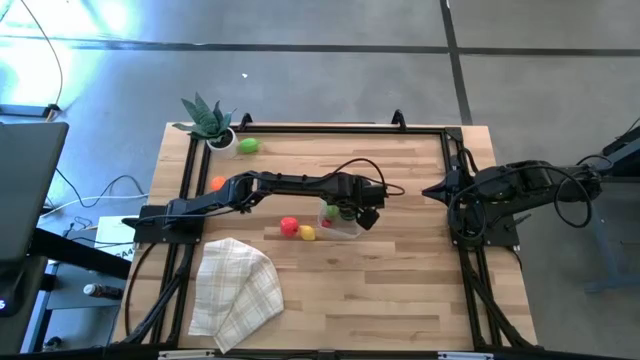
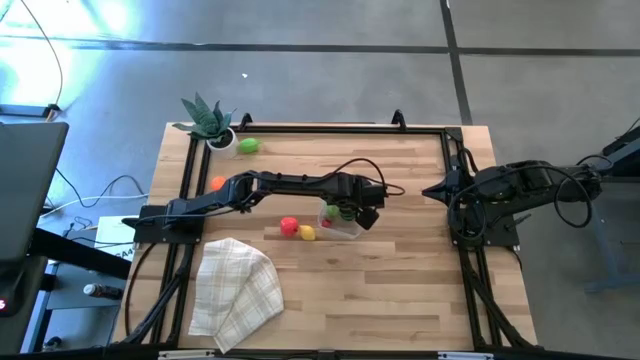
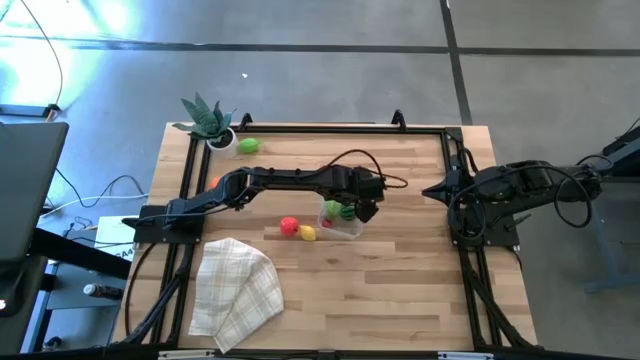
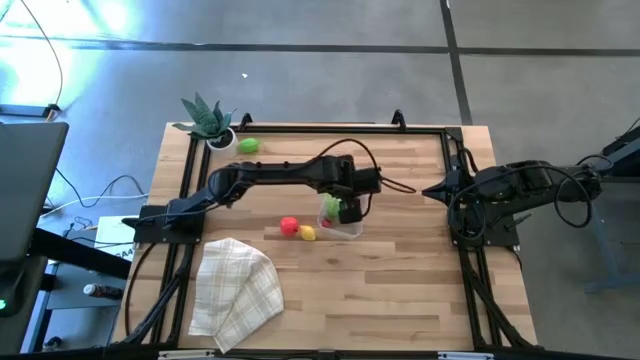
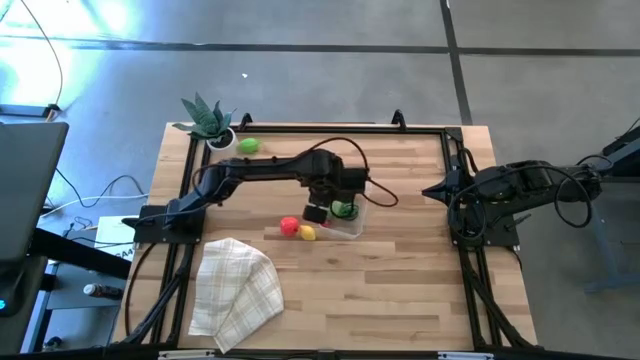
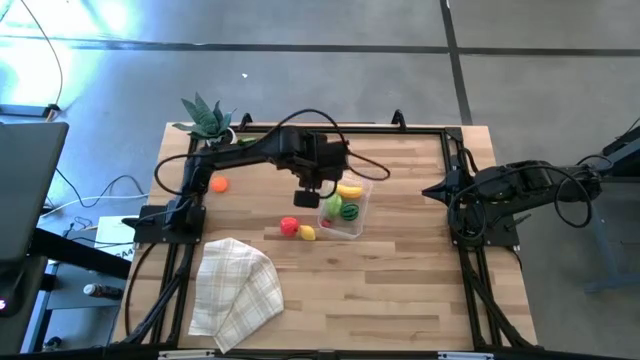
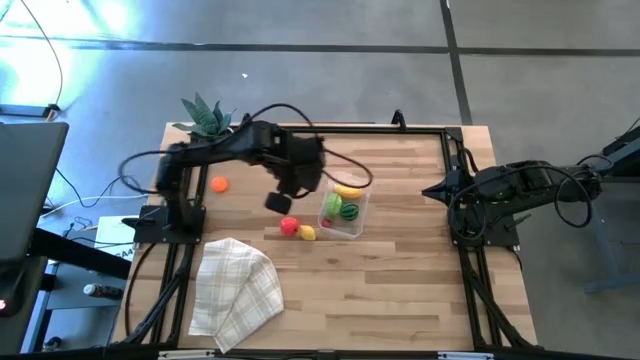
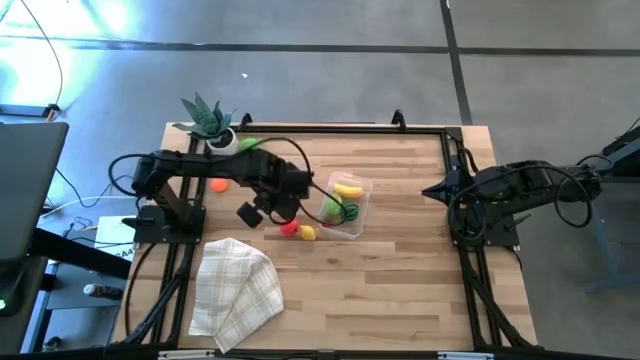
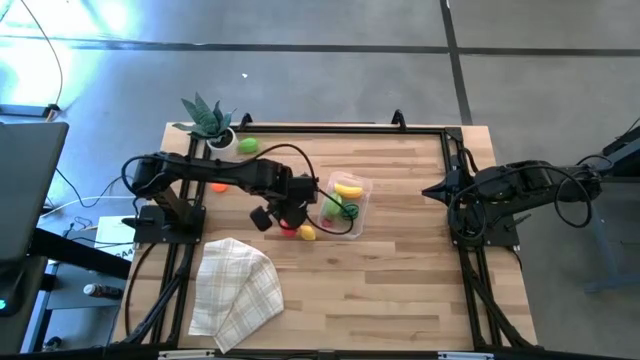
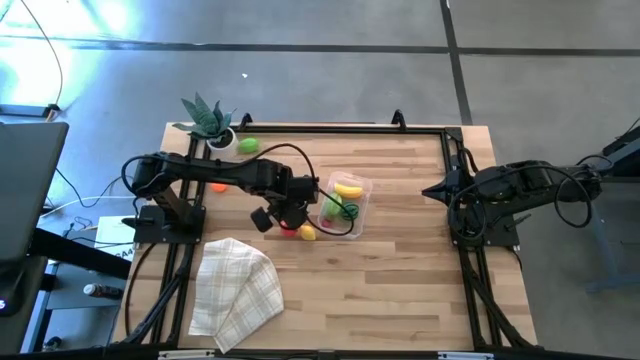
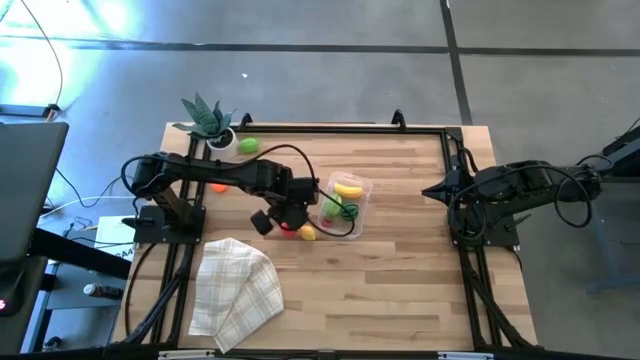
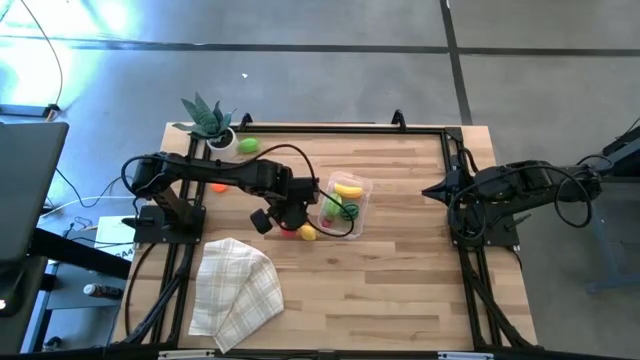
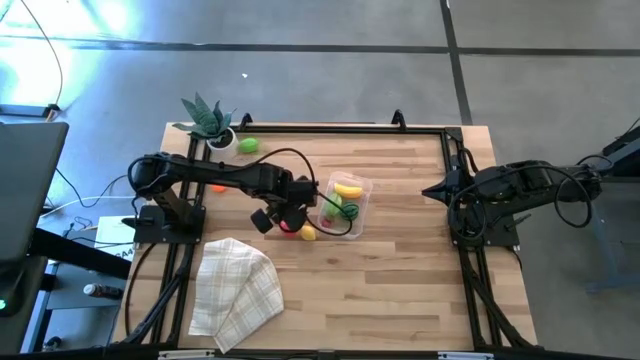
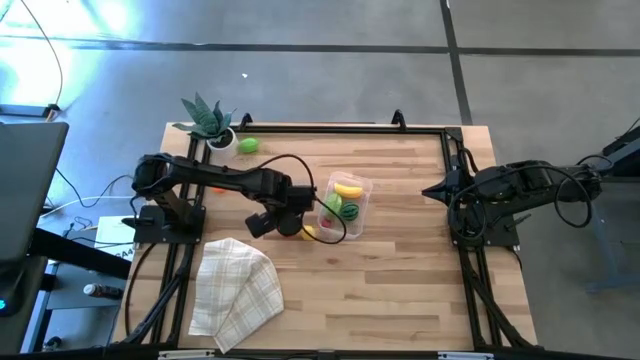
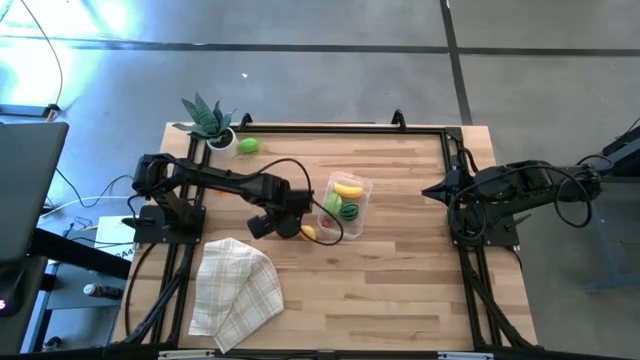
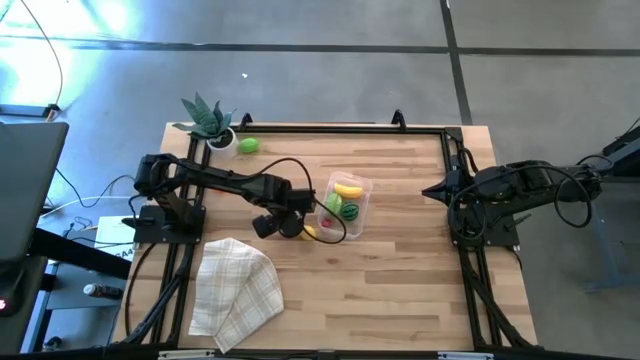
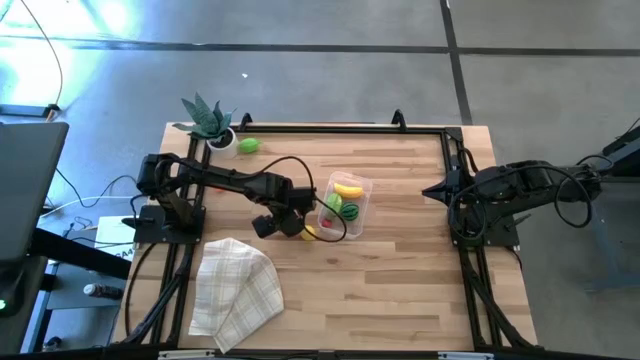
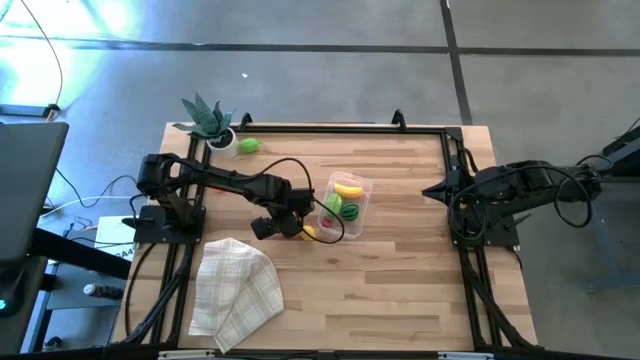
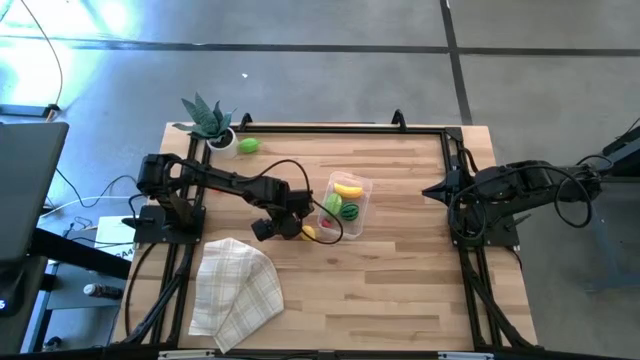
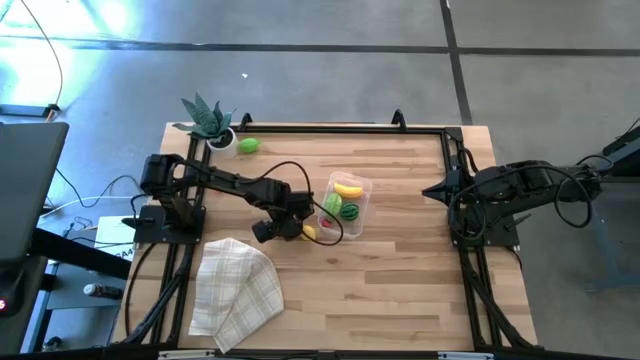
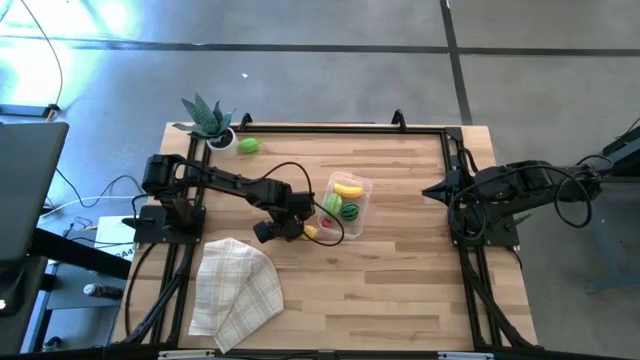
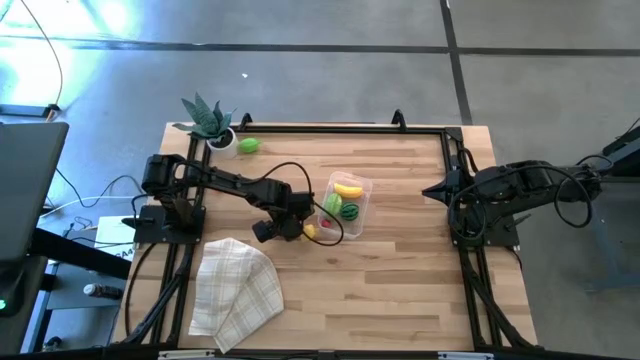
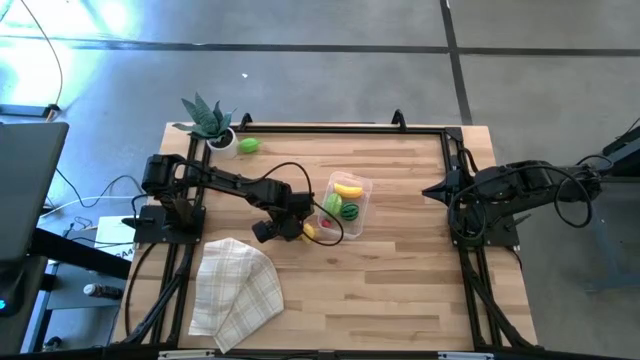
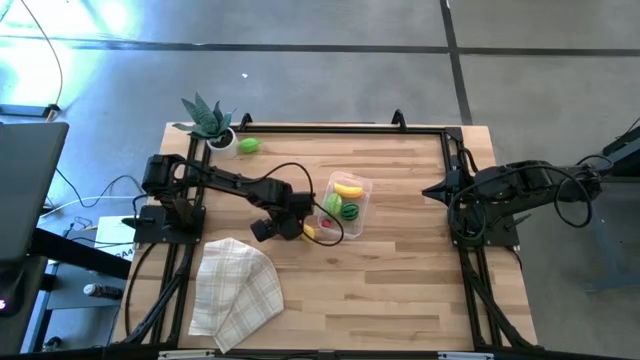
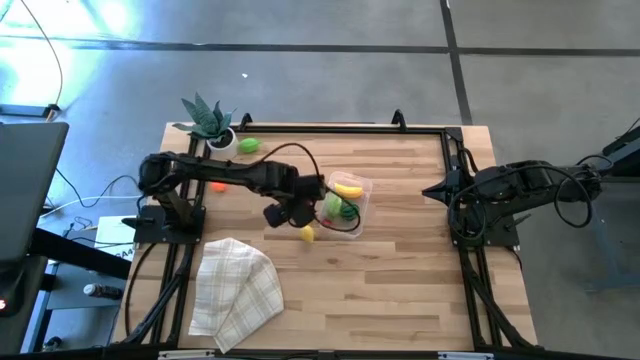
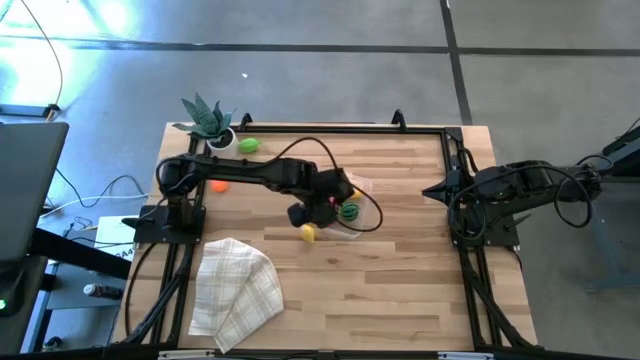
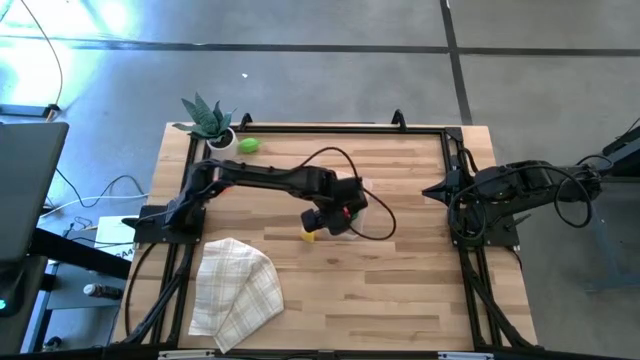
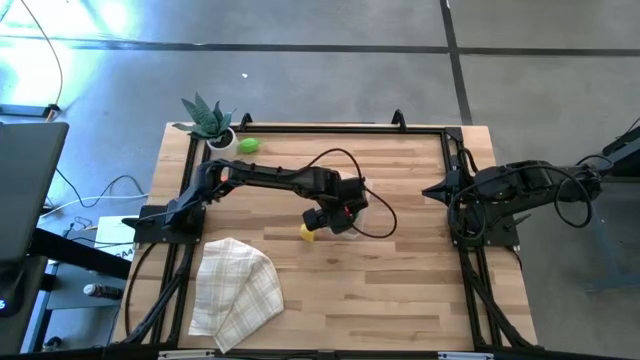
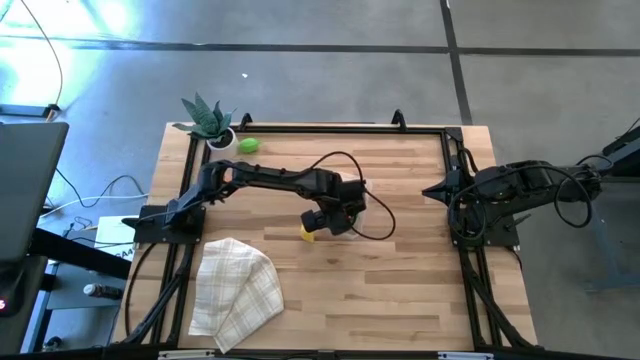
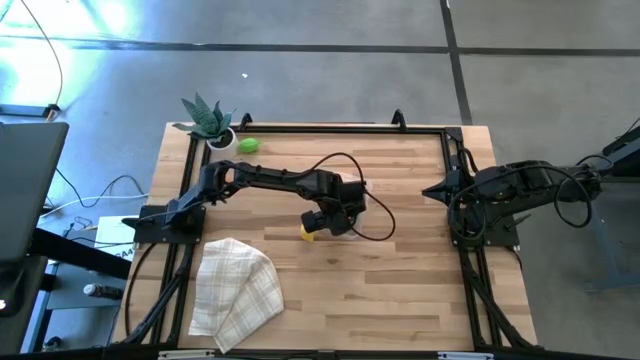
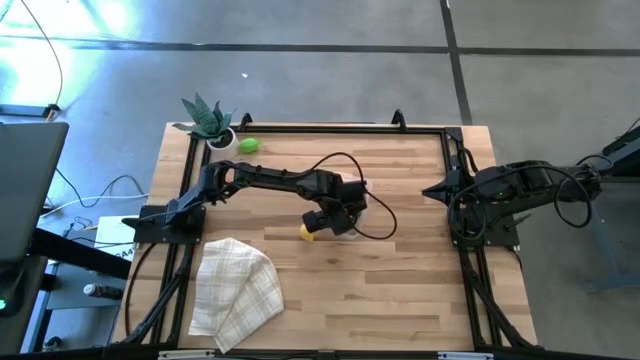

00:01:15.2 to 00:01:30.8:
Task: Pick and placing Produce into tupperware
Put the apple into the transparent bin

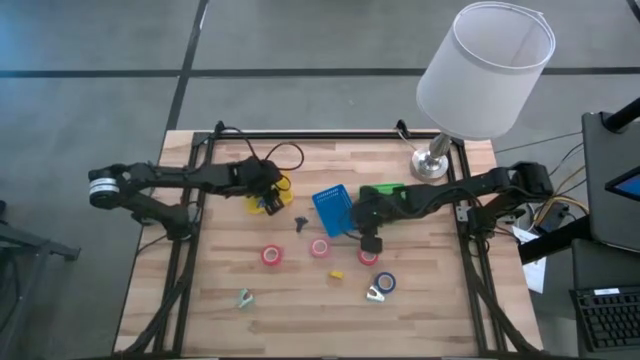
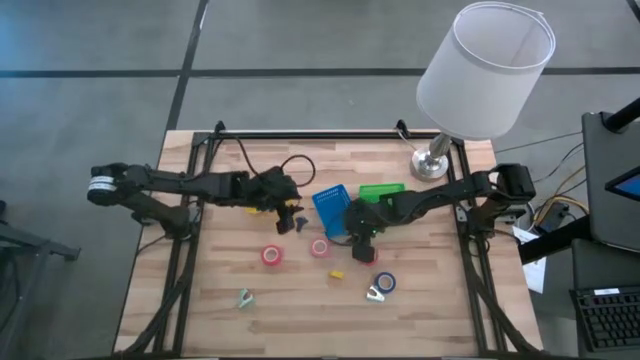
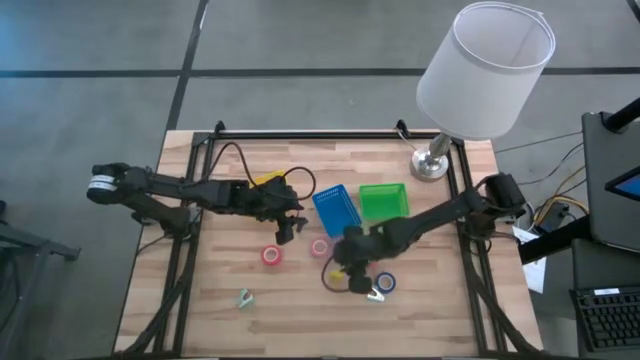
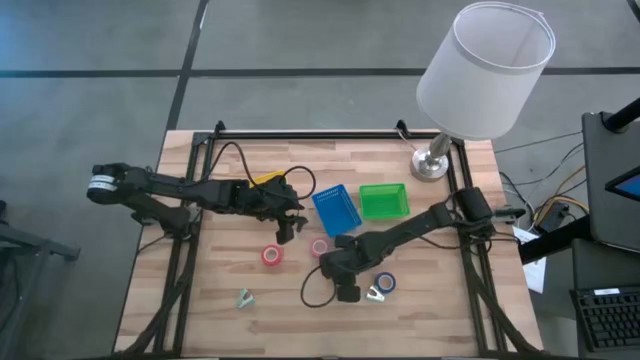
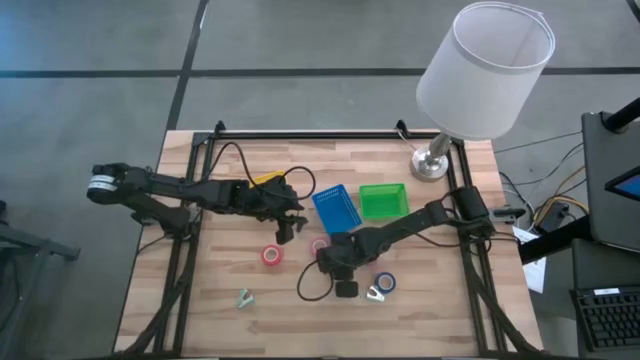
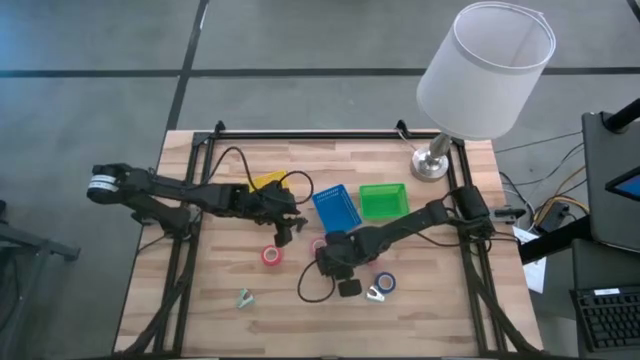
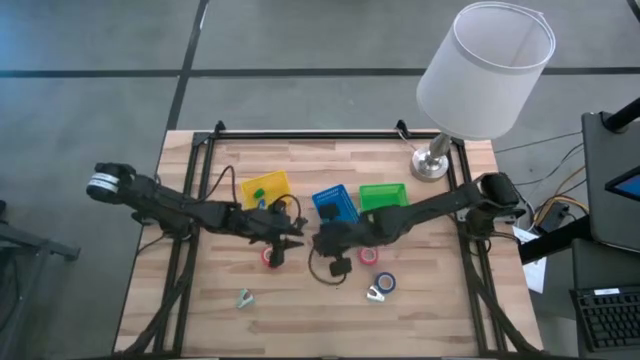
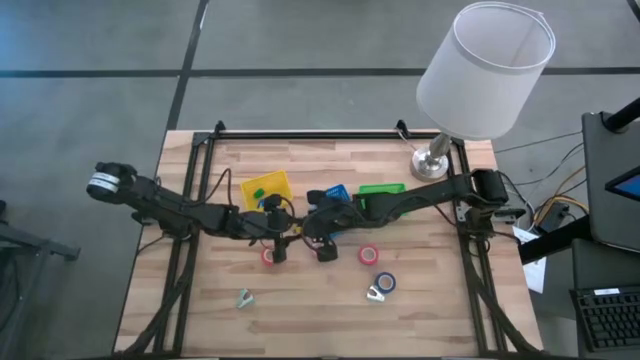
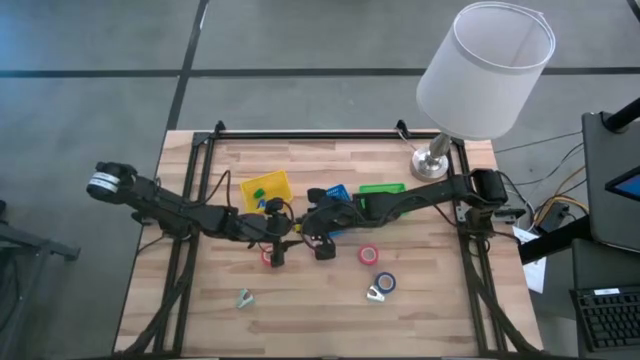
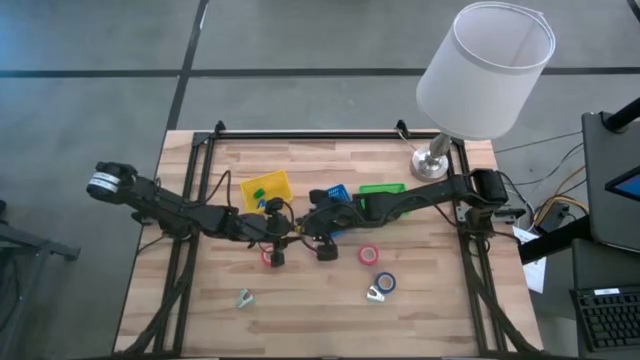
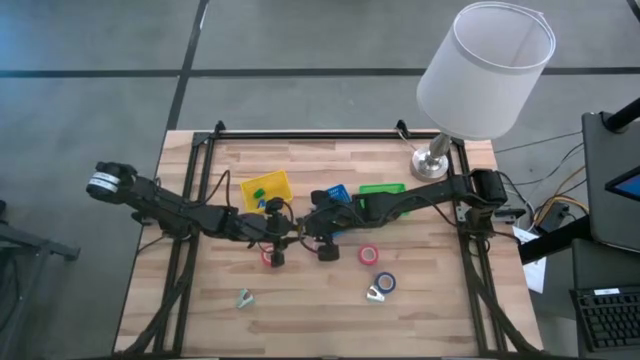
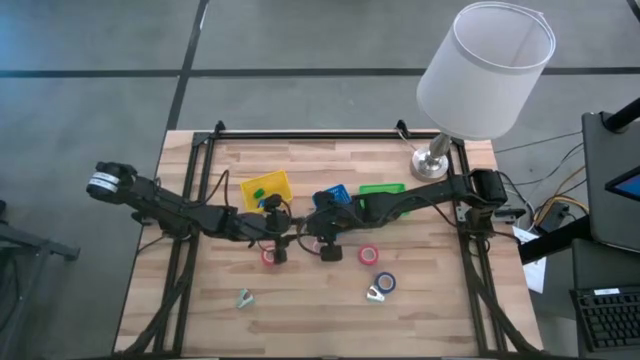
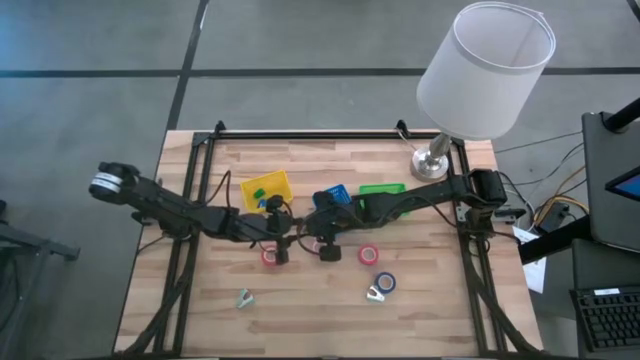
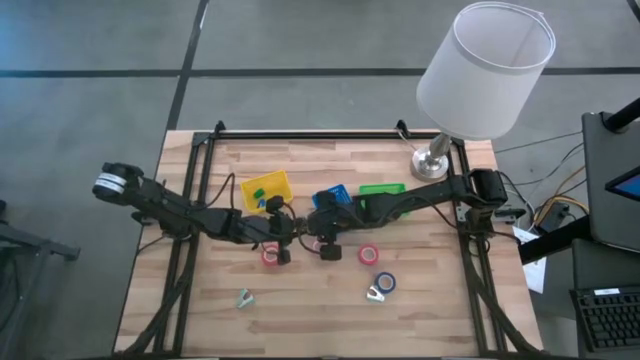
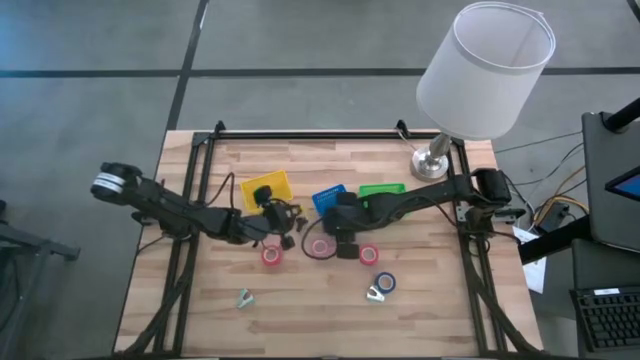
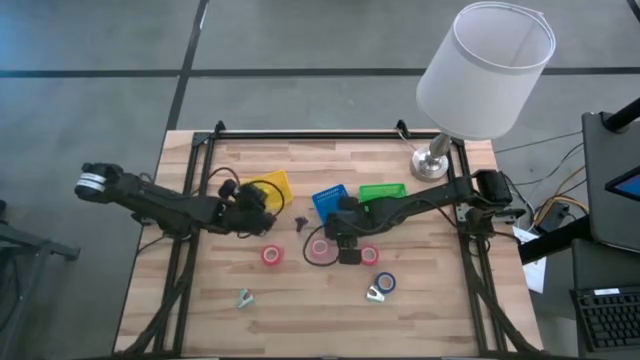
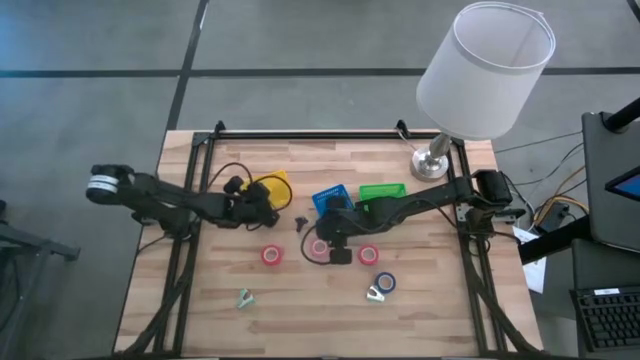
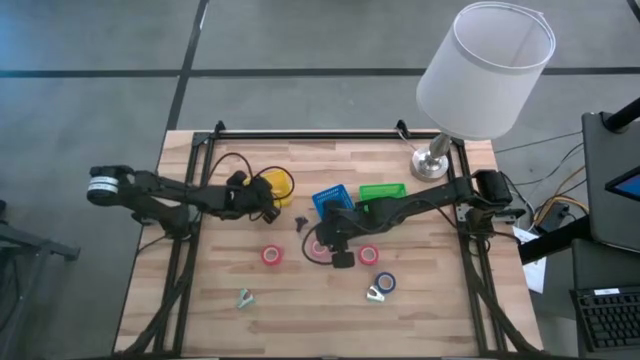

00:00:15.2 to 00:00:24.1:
Task: Pick and place Stapler, Stapler remover, tape
Put the yellow stapler into the yellow basket
